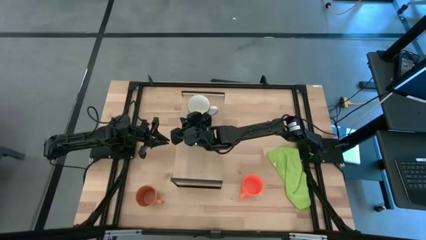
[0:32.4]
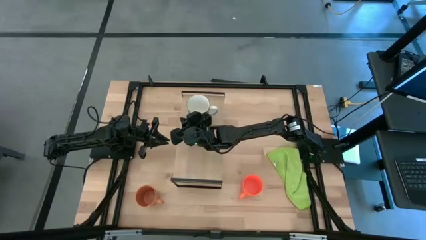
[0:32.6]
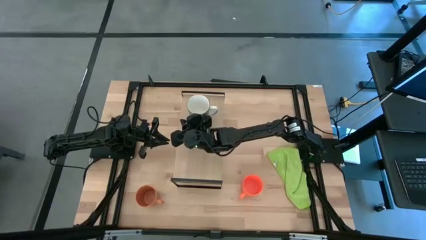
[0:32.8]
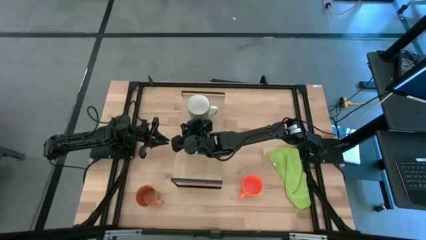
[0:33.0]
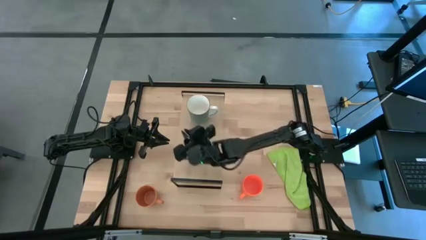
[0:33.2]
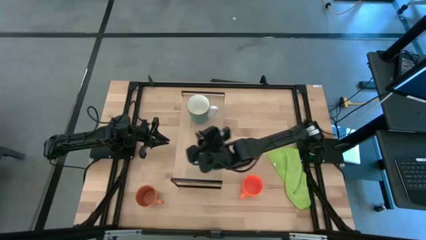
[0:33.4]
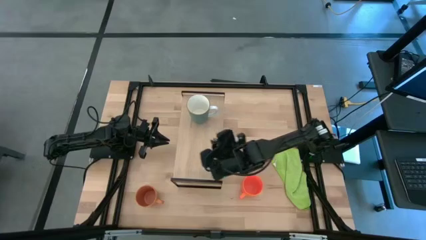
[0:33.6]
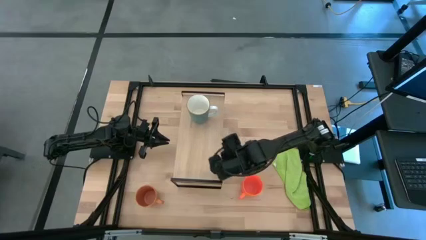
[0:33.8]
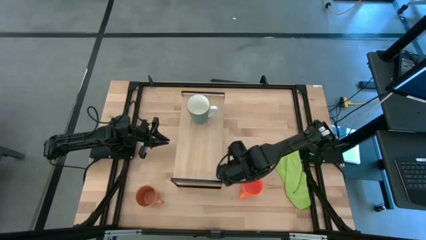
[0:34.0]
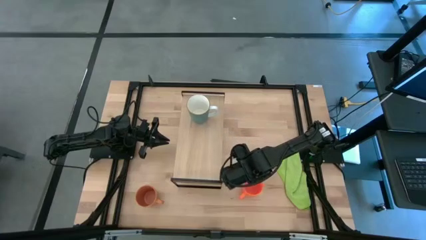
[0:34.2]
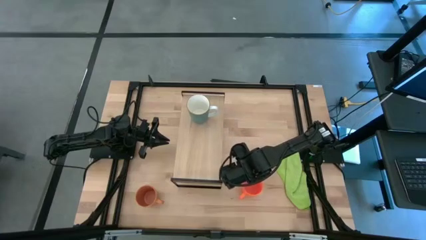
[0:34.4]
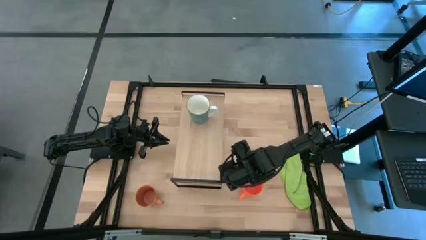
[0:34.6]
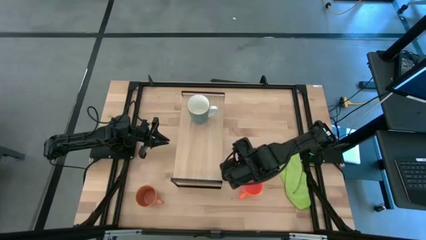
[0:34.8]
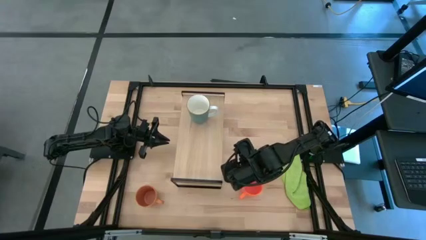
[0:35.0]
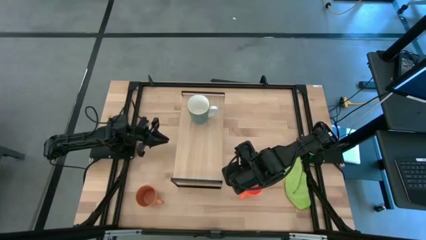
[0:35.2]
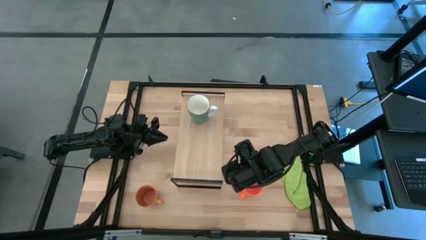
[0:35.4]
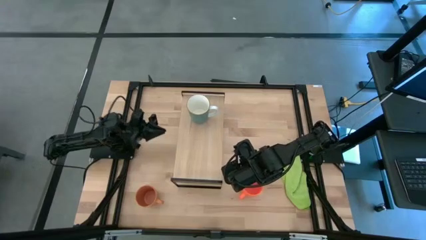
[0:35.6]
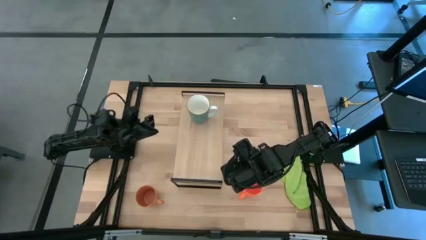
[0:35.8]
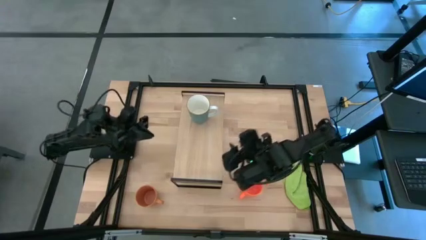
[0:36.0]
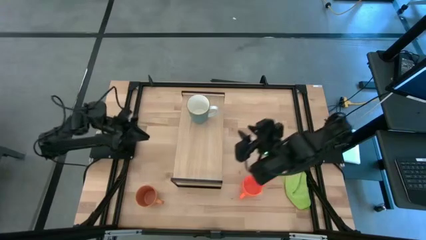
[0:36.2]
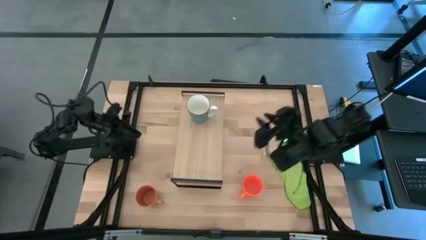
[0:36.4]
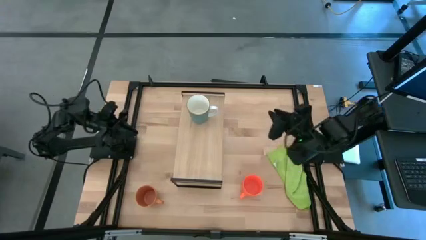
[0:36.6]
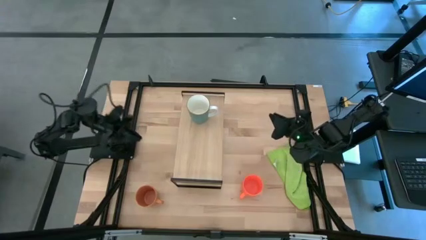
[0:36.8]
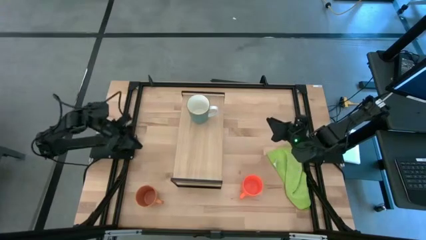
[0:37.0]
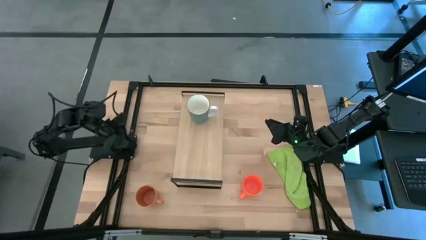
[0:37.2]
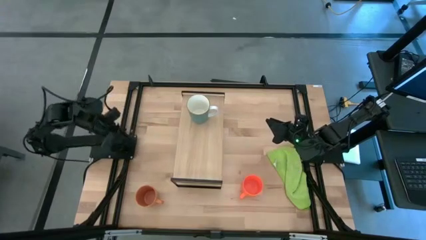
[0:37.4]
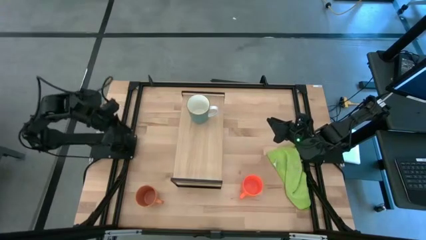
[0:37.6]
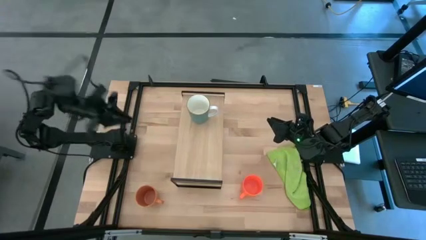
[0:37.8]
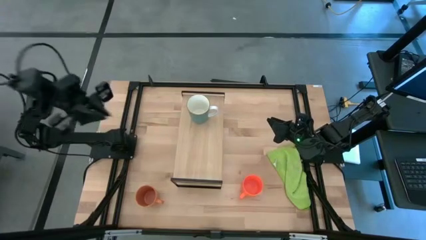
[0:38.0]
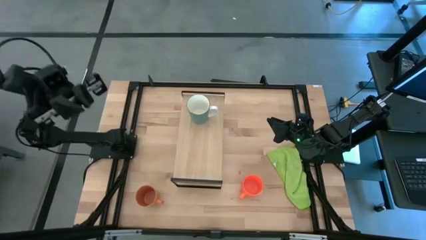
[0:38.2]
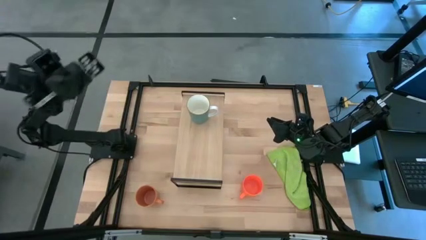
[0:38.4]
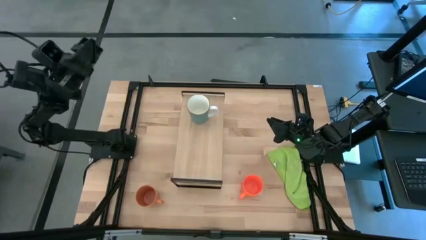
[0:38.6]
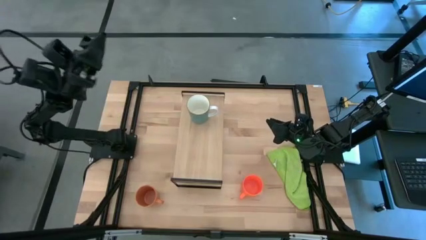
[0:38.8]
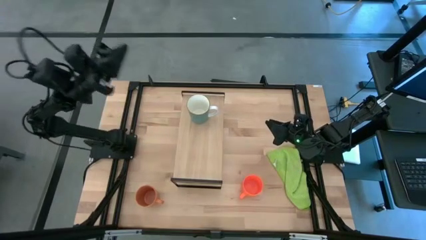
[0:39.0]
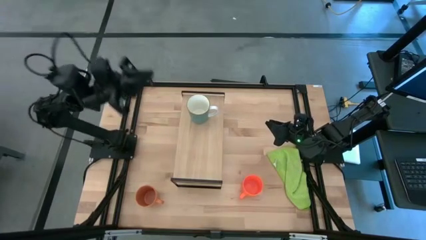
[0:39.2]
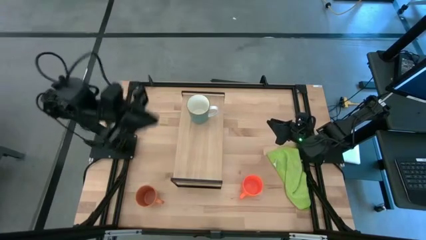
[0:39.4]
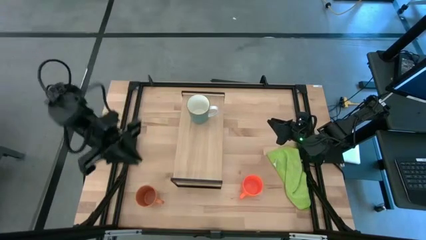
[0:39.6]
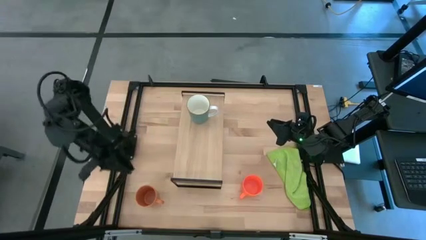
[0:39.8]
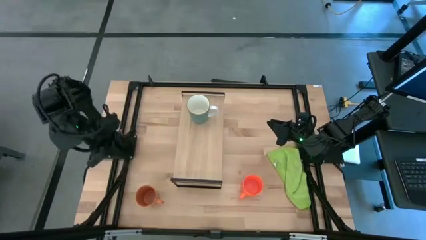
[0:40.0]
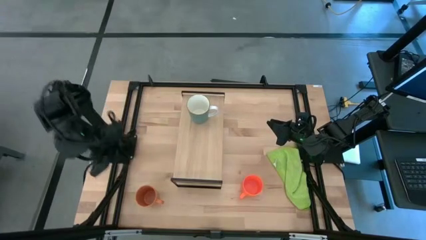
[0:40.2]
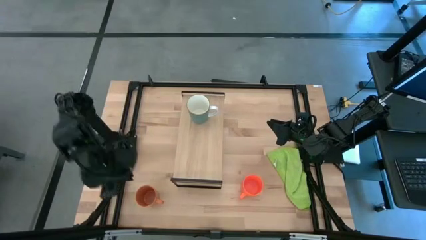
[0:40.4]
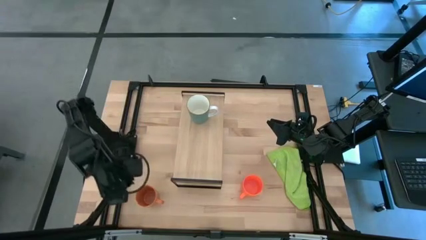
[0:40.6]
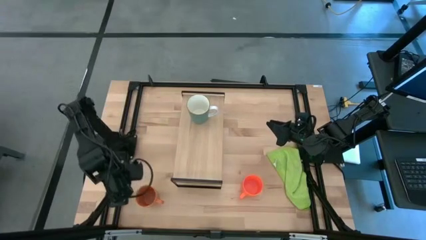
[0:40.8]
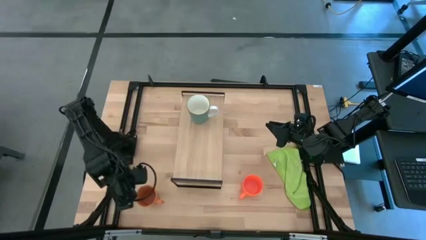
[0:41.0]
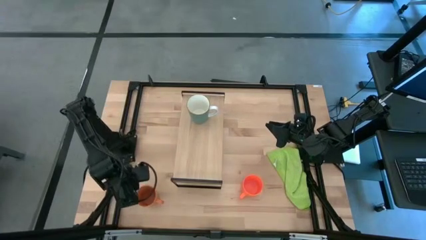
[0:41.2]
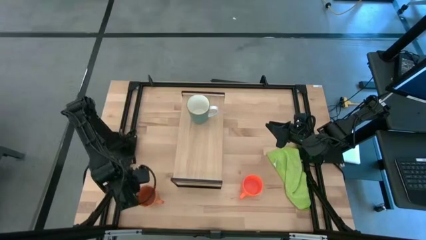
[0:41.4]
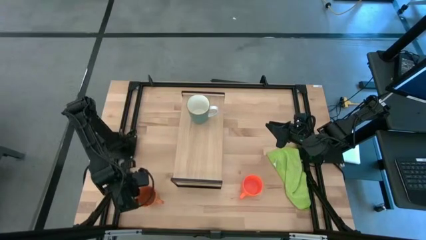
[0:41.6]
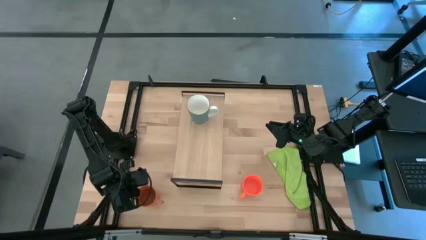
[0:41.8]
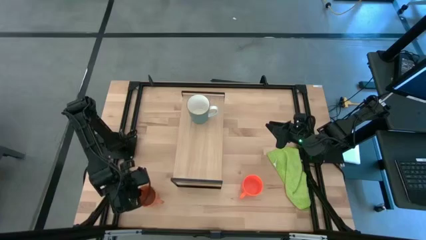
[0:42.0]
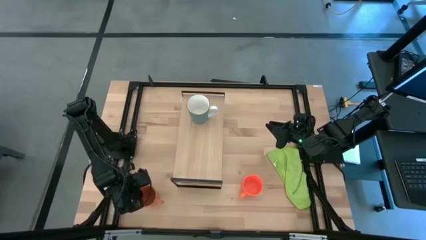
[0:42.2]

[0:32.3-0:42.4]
Task: Stack small to large cups/mugs on shelf
Put the dark orange mug on the shelf

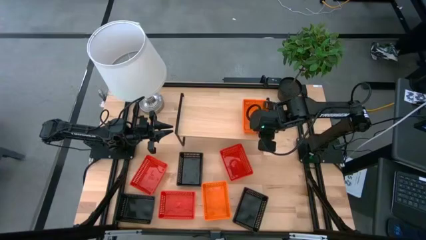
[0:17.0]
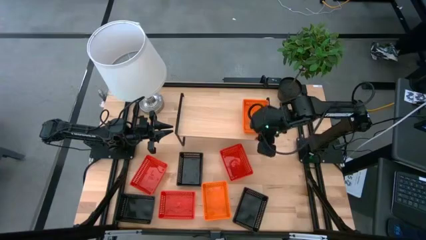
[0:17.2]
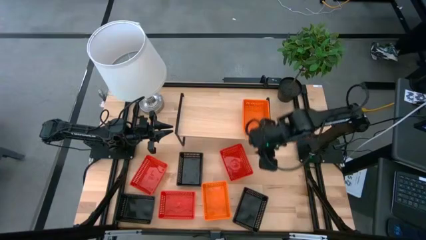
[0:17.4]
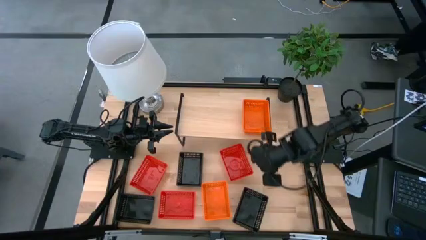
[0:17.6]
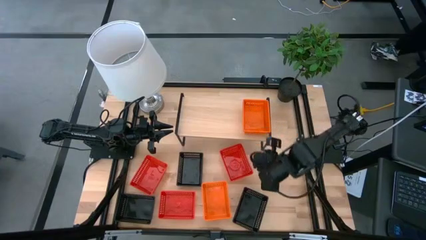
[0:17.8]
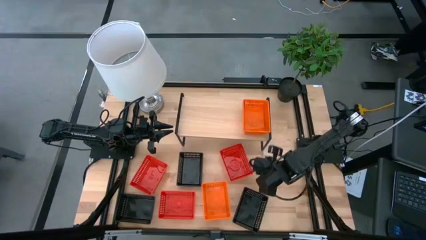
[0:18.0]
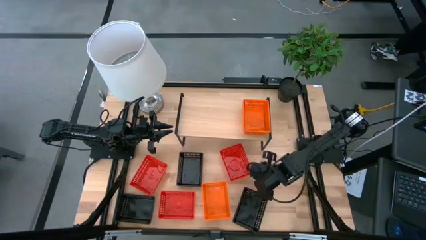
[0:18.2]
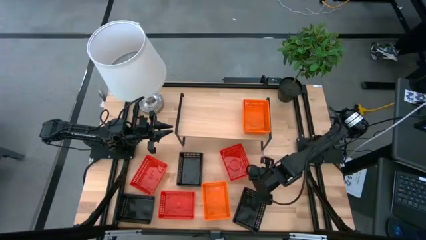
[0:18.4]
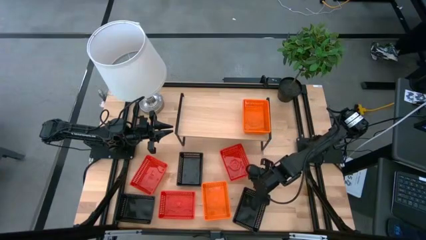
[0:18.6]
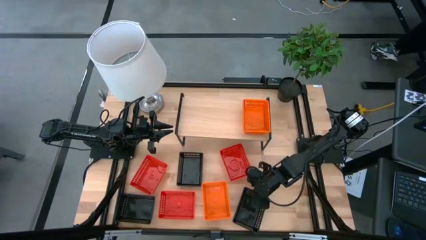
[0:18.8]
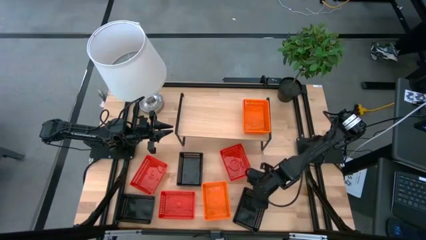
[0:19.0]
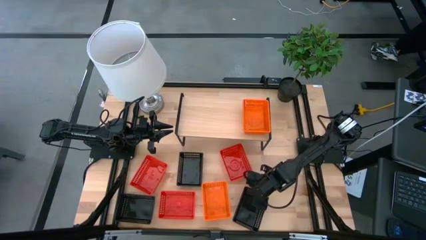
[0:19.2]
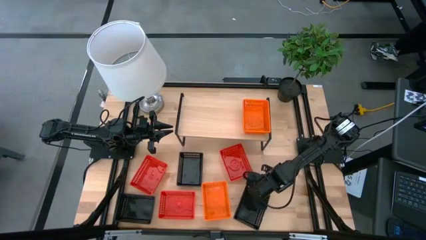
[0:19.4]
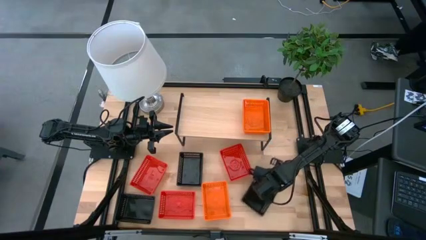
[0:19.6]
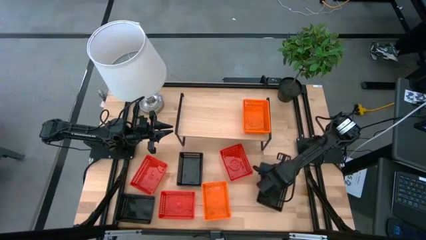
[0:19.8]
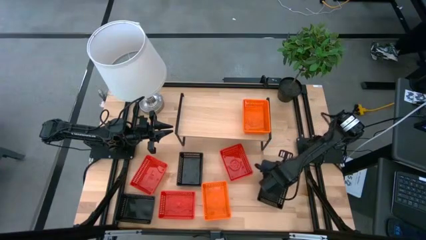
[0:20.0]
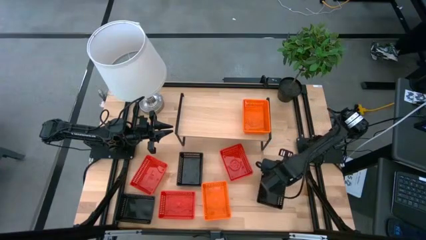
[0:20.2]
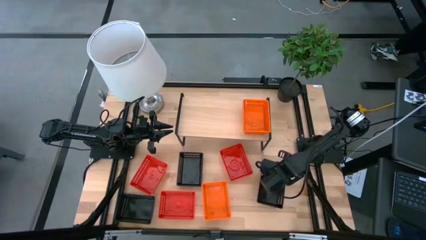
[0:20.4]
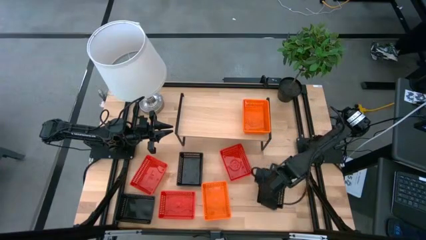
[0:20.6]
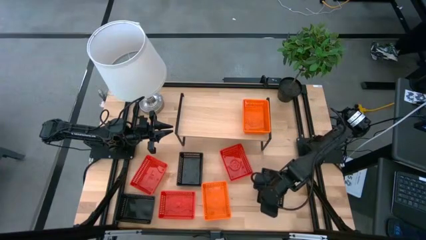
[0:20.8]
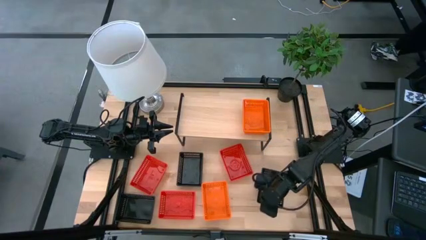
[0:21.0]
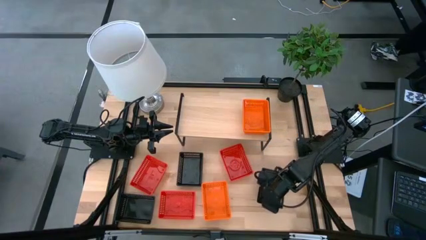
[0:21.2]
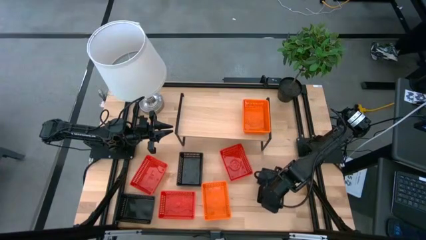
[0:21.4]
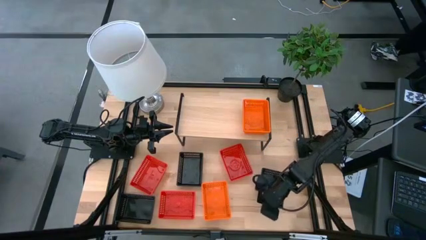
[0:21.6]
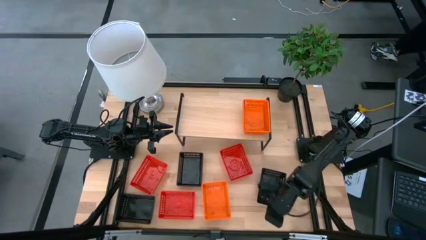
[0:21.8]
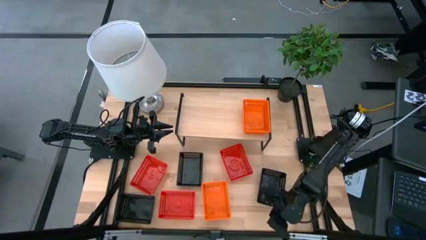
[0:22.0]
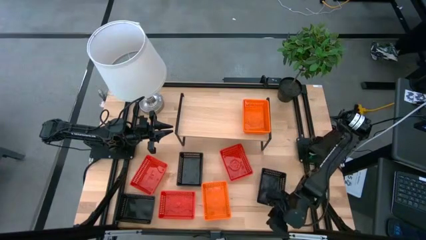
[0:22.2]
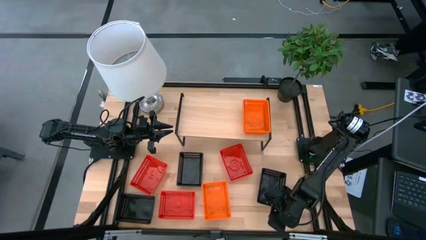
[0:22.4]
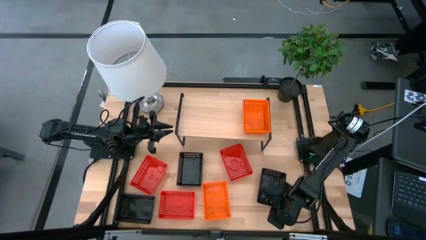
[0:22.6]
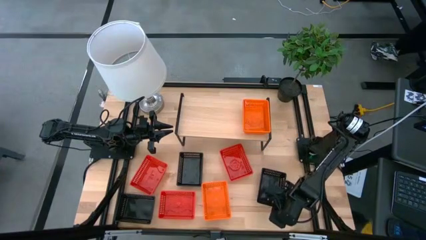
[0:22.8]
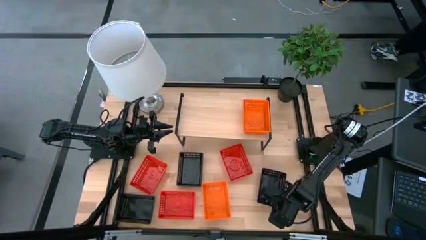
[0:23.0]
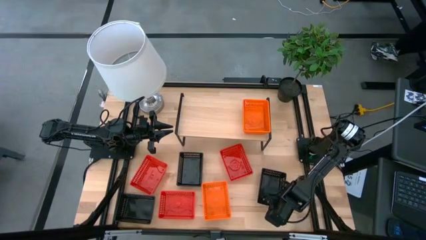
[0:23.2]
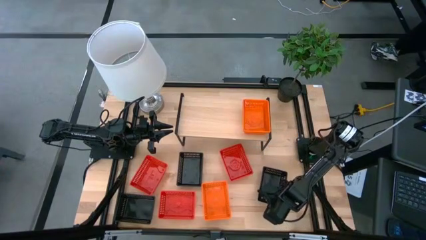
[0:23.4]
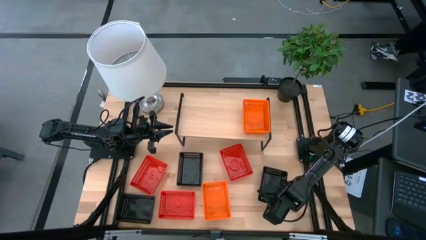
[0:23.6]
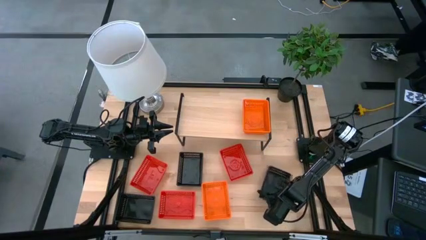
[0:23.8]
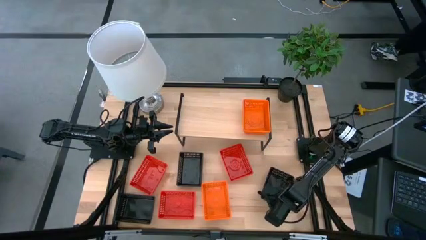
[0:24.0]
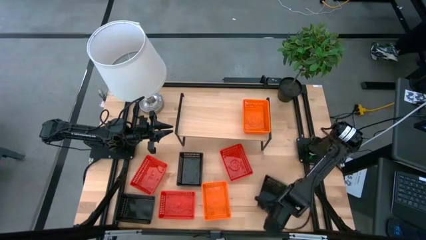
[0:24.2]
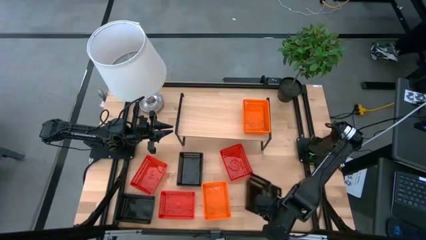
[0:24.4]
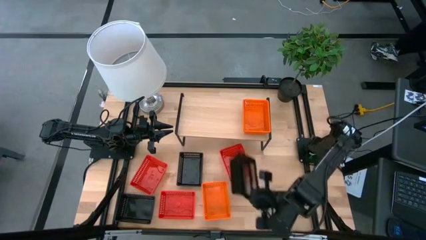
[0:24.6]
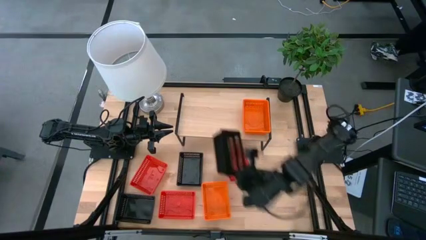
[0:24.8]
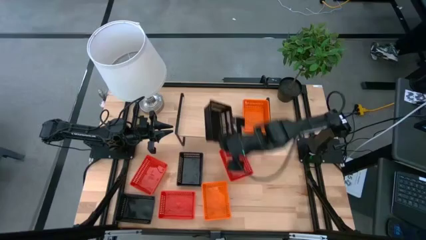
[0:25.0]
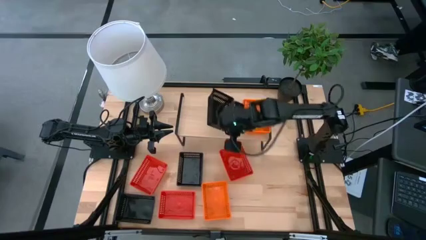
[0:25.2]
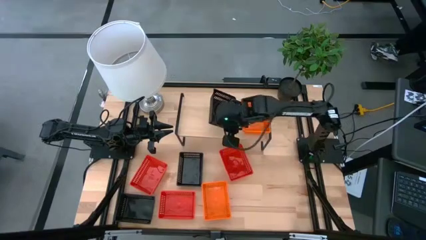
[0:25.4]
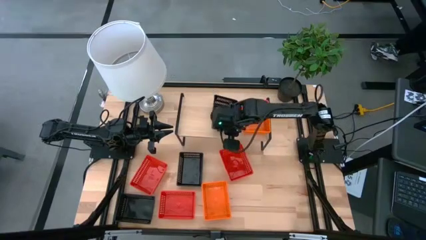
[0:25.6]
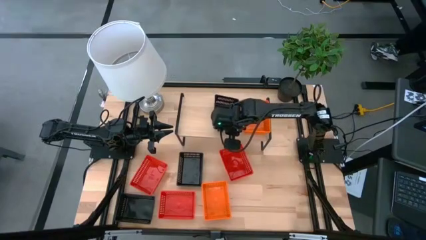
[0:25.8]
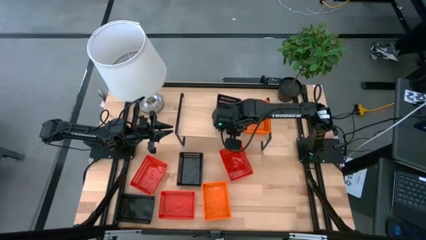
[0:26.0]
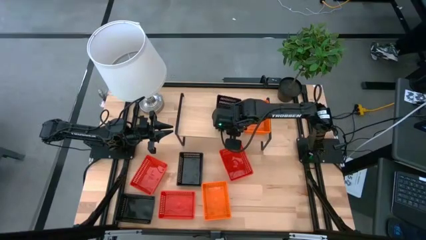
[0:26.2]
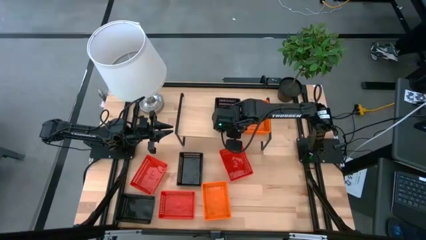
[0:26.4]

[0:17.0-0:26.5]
Task: Stack baskets on shelf by color
Put the right black bin on the shelf
